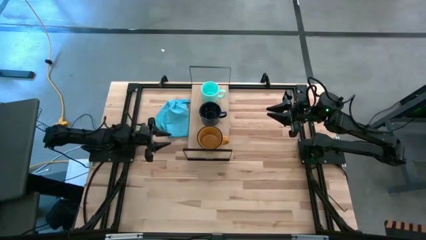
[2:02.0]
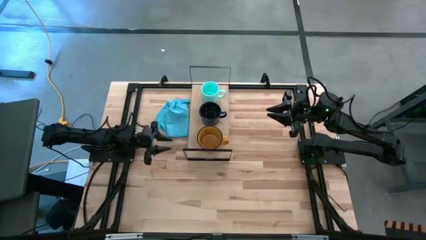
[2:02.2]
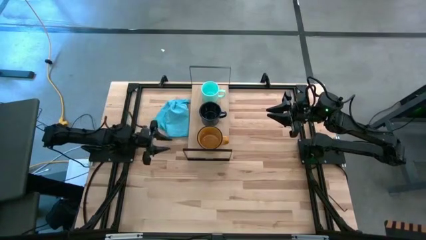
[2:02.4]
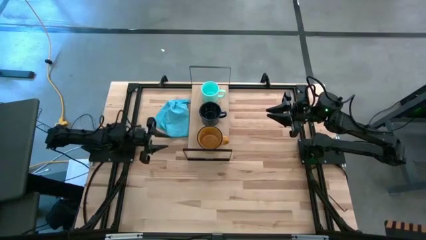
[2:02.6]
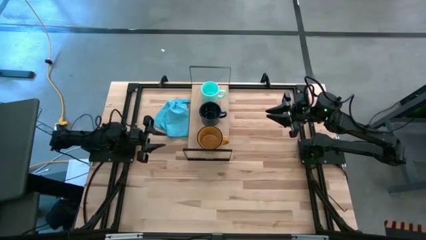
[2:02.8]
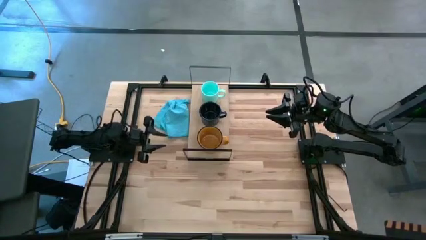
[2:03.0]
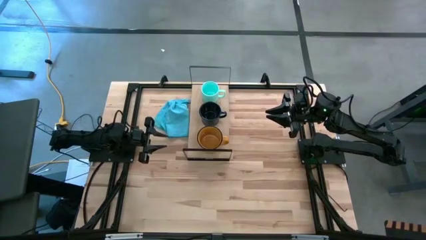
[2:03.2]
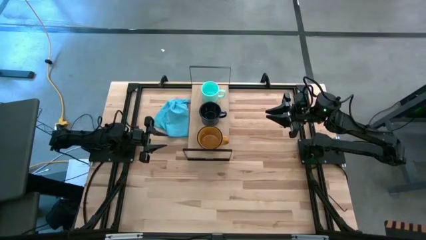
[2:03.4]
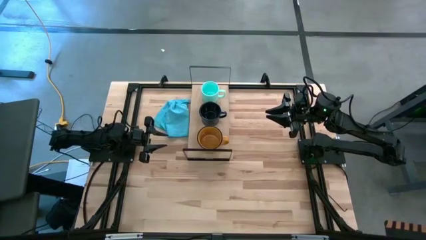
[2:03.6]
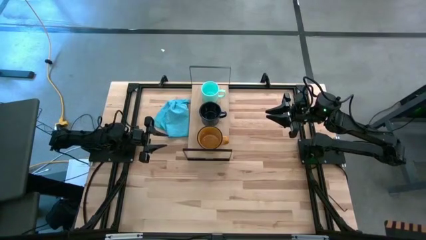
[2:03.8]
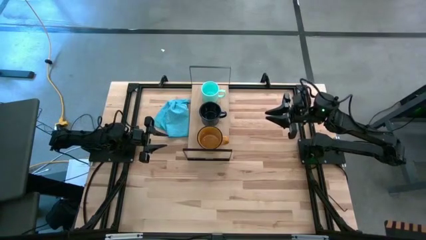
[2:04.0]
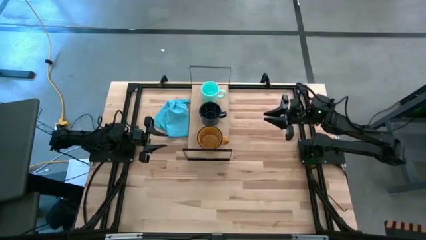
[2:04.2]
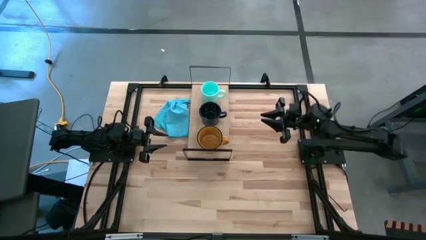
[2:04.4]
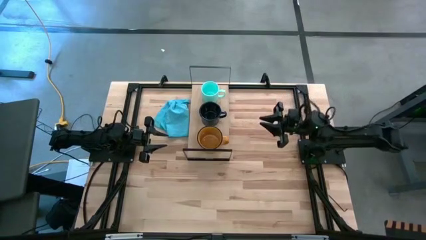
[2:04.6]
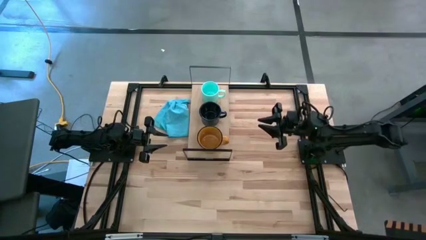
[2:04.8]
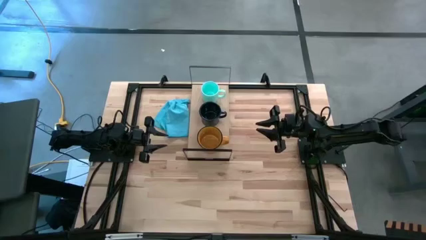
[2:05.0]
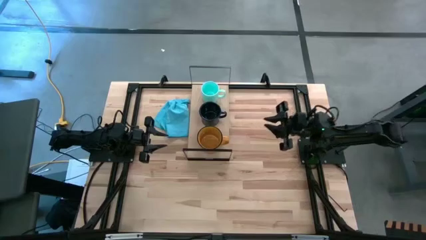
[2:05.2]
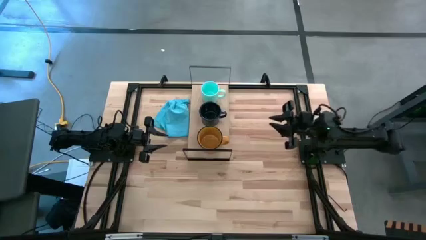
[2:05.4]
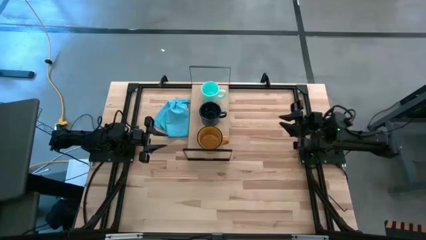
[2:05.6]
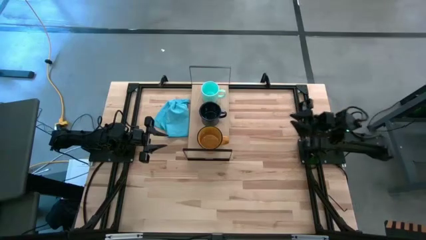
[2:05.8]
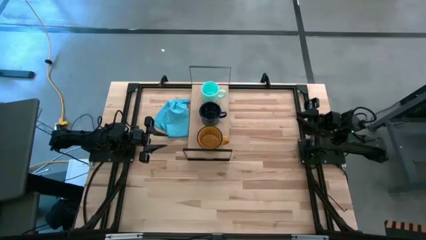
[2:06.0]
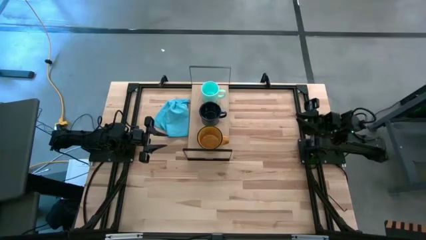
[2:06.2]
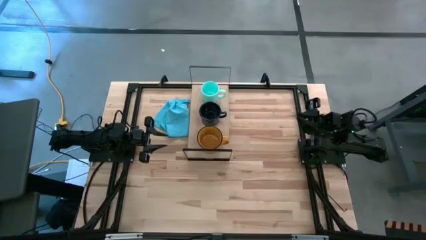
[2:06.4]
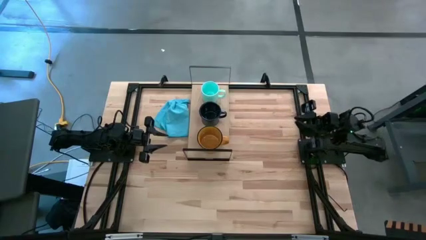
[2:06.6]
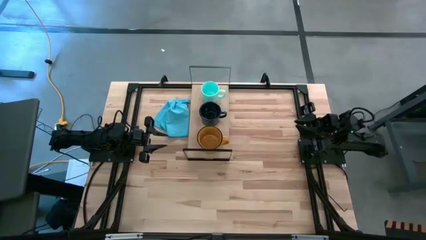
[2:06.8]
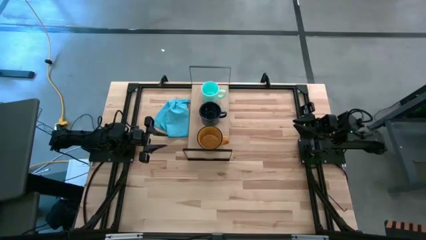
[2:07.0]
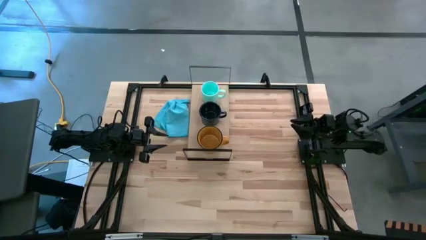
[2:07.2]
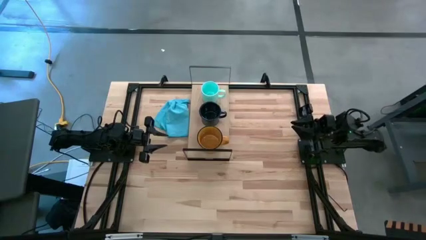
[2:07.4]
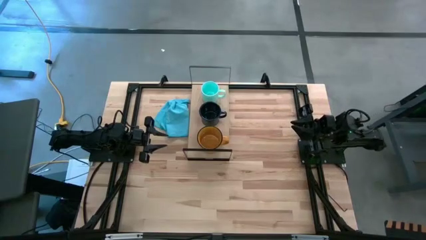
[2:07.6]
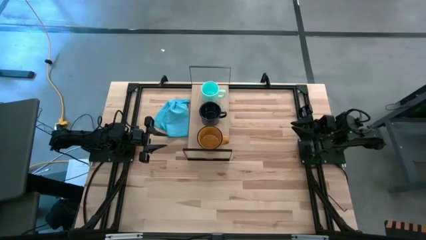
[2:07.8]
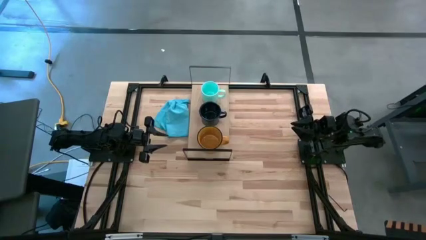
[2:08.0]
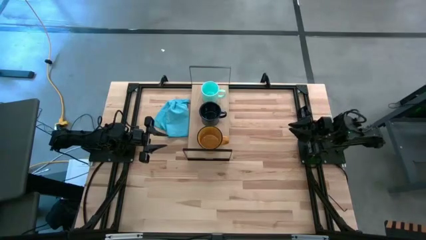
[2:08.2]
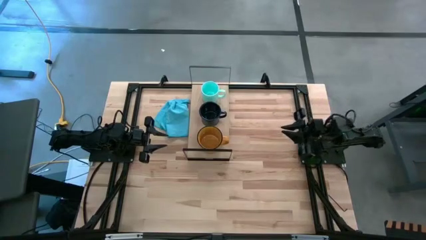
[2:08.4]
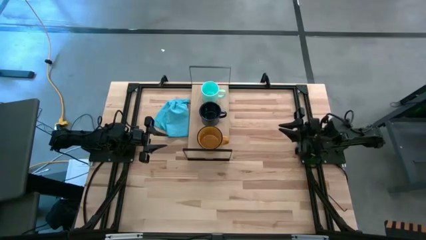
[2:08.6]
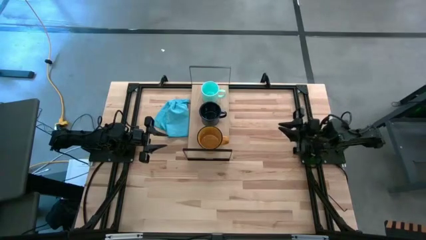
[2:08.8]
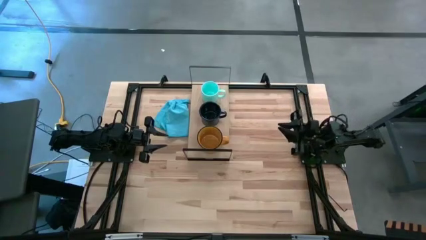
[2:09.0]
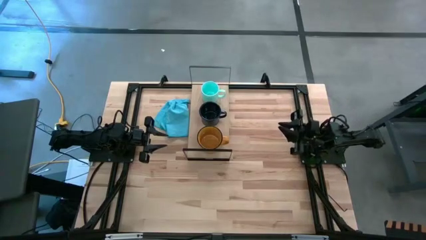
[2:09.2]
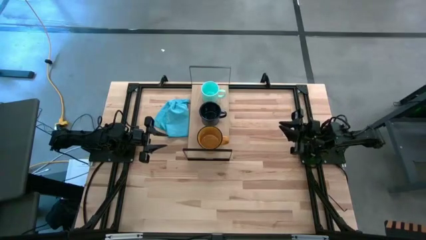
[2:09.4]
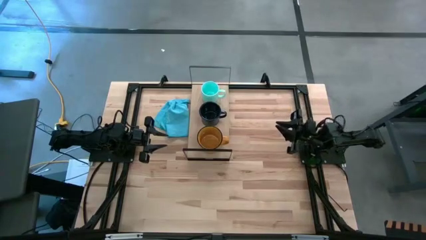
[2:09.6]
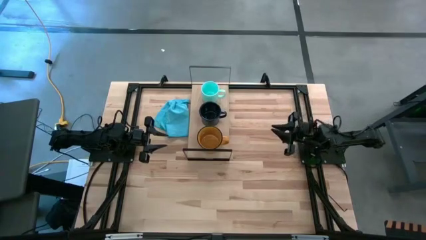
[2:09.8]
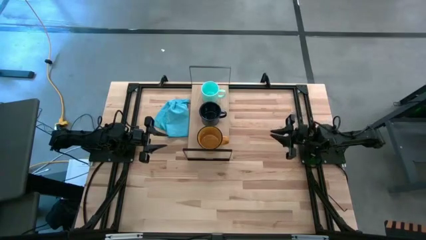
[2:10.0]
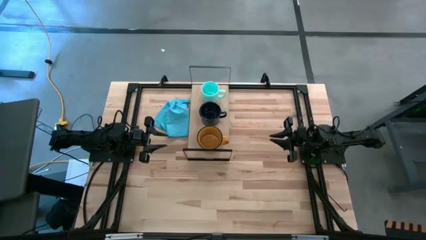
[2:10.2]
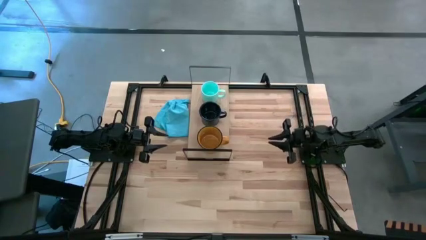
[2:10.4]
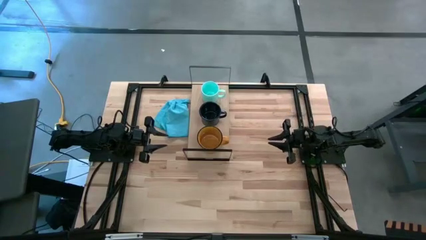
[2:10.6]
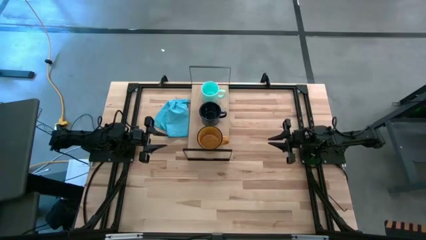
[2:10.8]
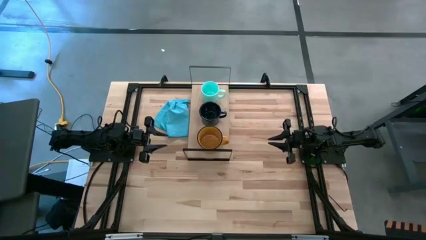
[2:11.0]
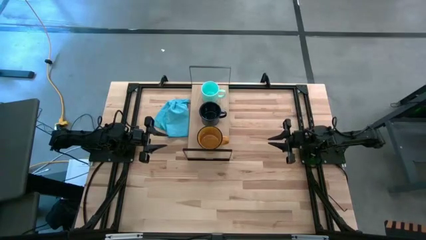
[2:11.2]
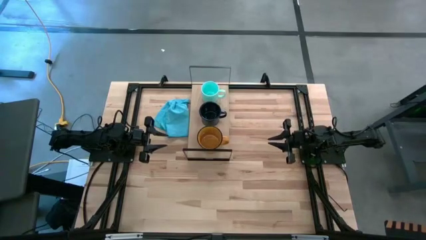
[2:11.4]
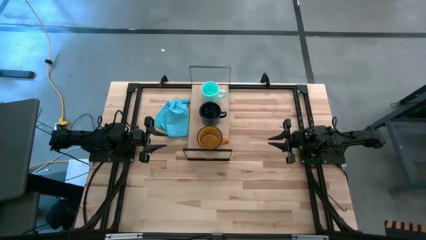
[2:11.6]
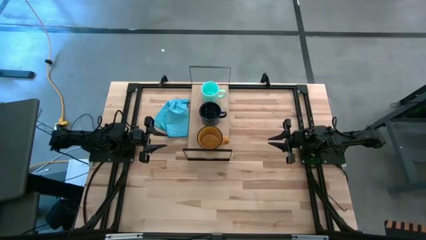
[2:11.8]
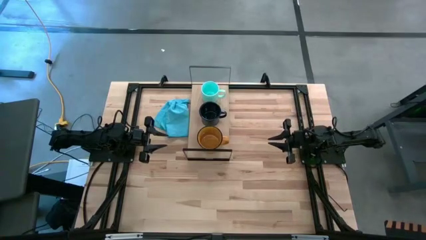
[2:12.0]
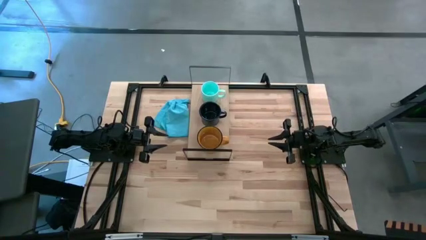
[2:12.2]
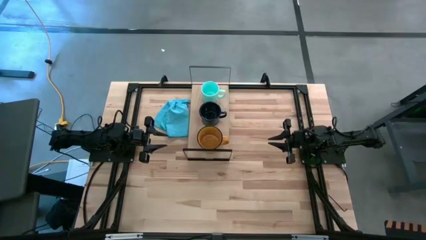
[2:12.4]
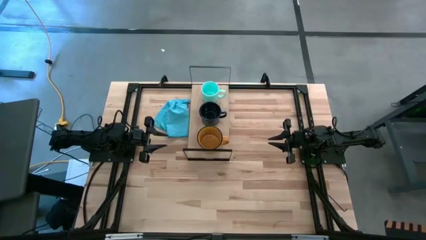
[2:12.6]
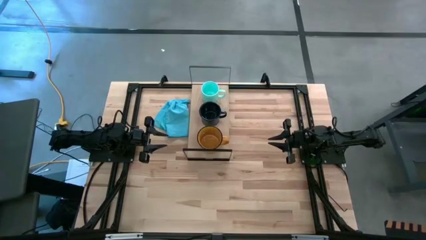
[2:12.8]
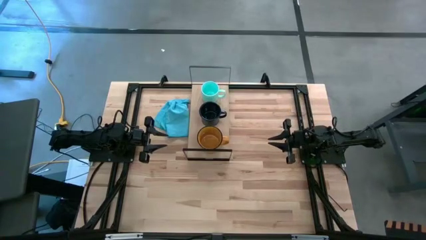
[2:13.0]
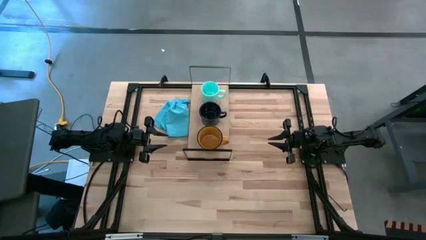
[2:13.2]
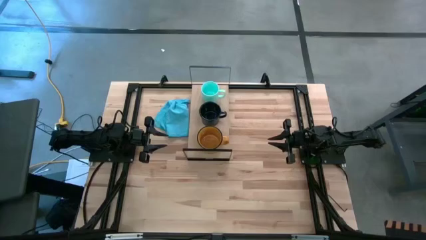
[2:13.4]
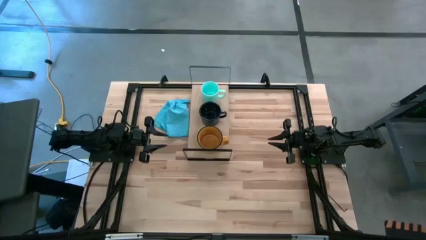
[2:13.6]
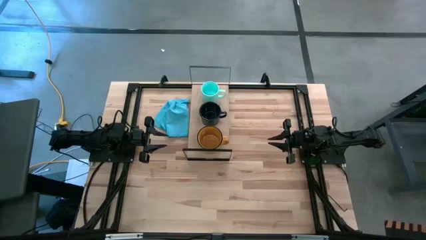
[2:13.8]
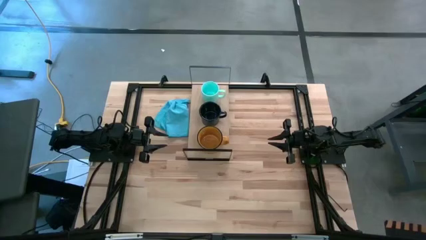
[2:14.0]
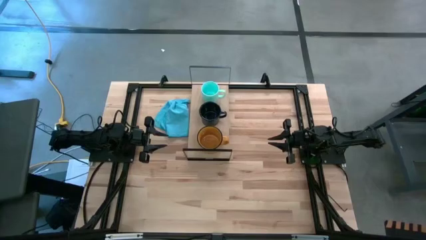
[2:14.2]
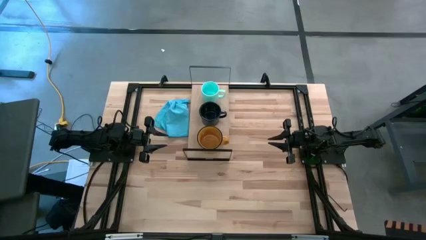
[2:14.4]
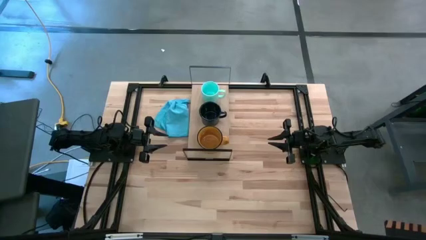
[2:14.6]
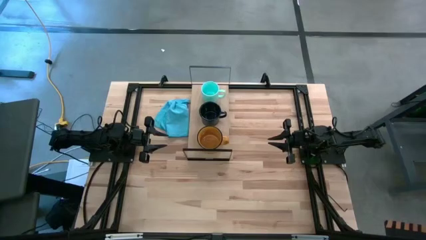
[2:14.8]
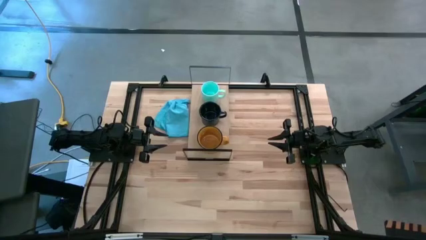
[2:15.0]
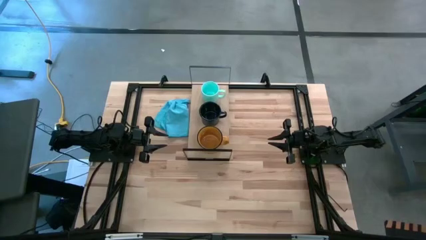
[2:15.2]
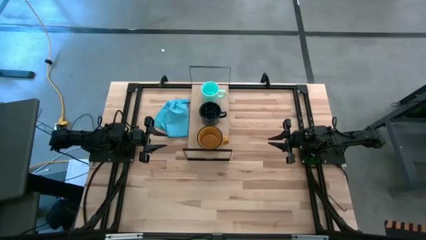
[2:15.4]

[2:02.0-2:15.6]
Task: Stack small to large cups/mugs on shelf
Return to Home Position

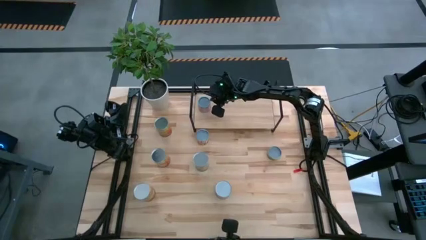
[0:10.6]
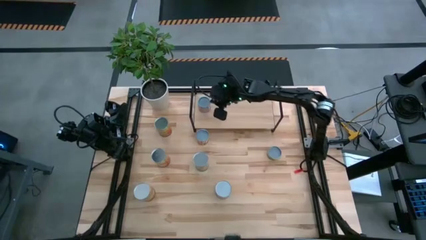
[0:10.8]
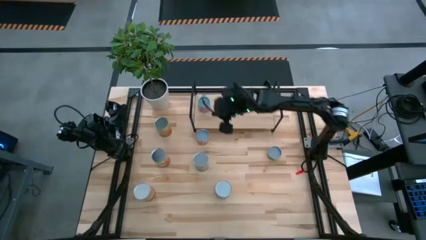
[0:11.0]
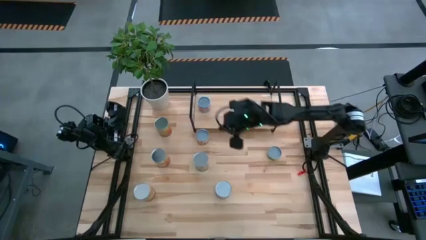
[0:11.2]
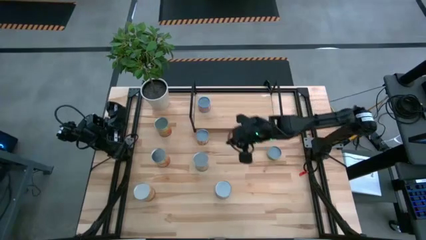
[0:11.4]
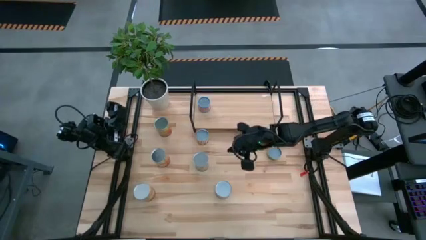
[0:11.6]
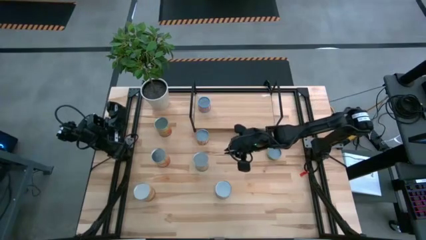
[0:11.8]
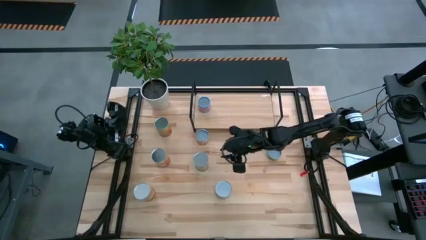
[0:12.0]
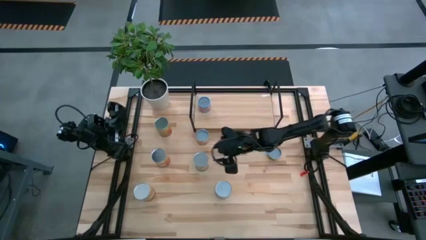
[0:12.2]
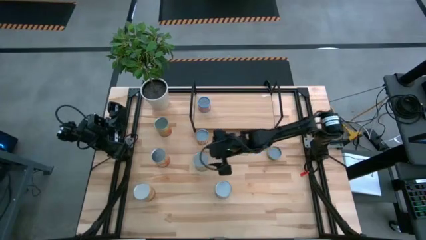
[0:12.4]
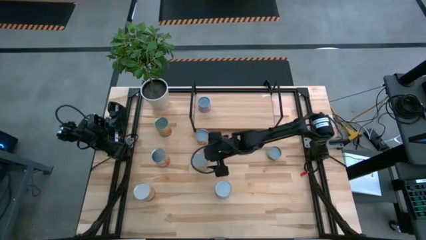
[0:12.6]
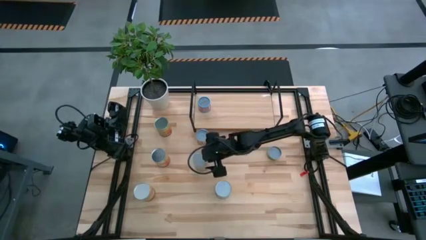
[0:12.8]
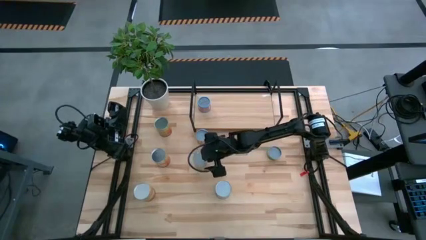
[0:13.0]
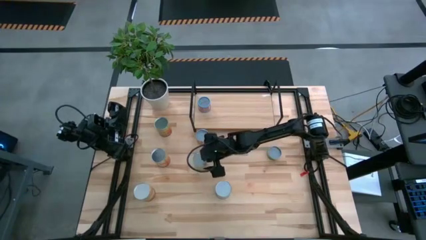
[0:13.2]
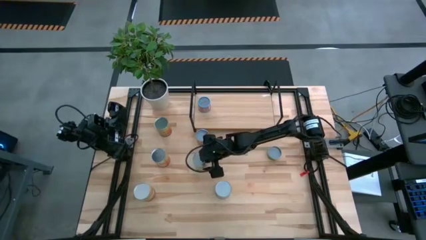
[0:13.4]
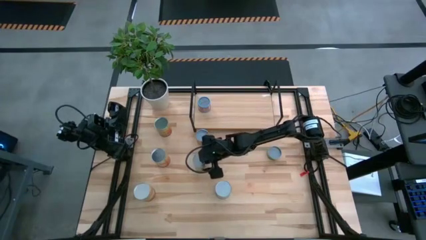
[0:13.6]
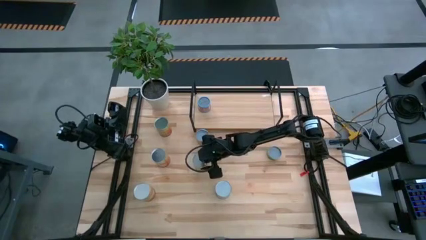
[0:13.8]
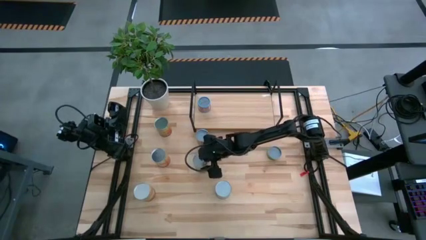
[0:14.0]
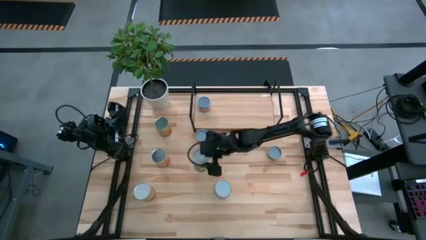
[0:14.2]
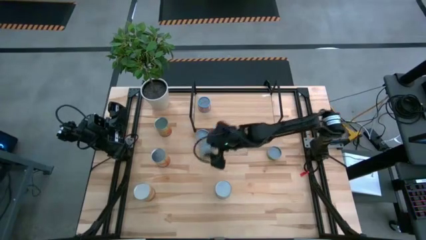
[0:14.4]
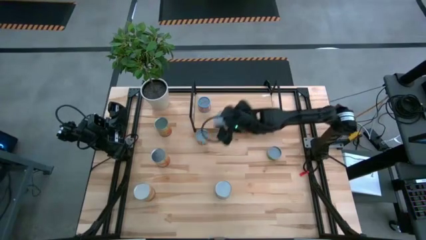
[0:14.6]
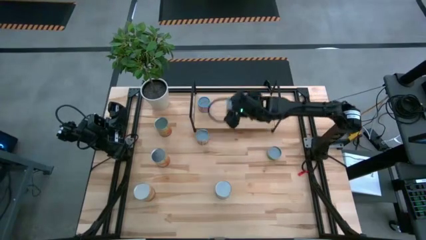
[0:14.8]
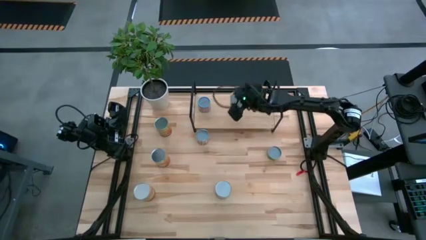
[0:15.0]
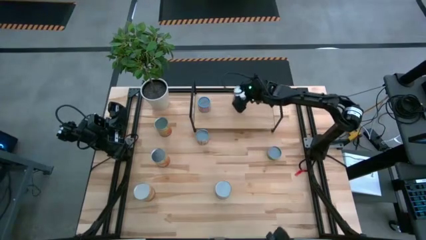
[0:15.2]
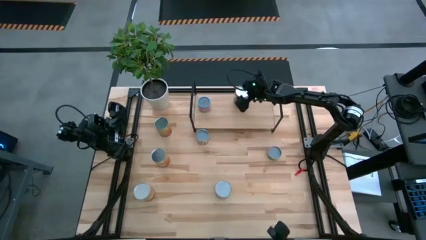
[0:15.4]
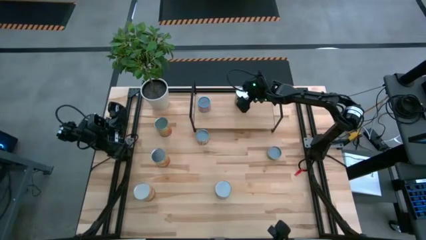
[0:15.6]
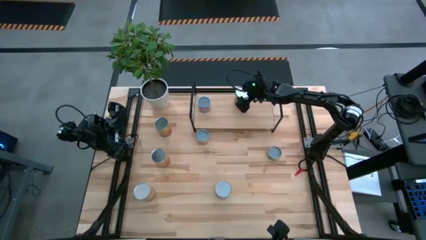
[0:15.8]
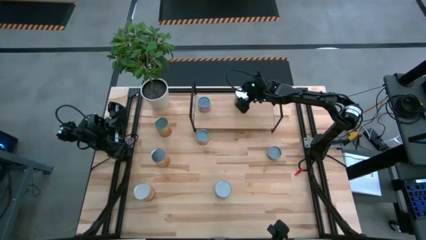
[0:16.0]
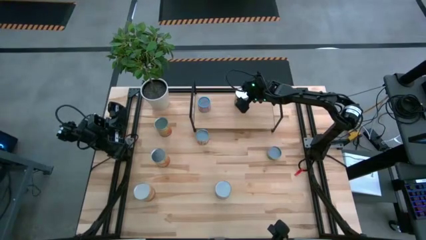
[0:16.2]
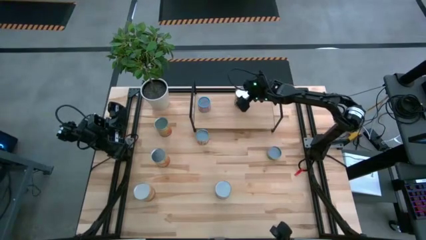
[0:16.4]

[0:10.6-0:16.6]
Task: Pick and place cans onto a shelf
Put the canned oranges on the shelf
